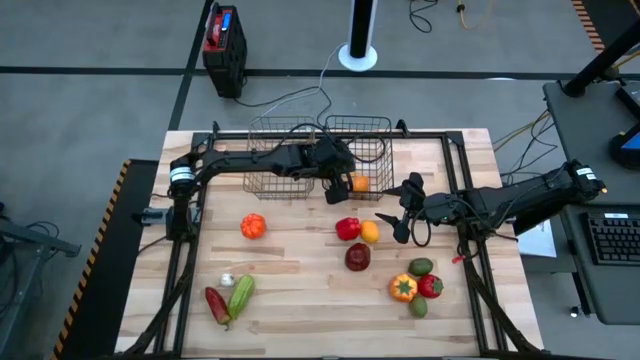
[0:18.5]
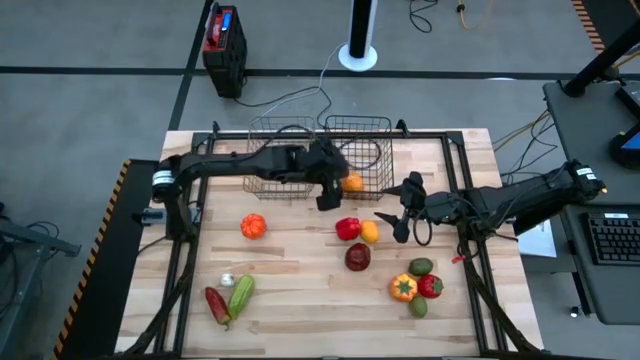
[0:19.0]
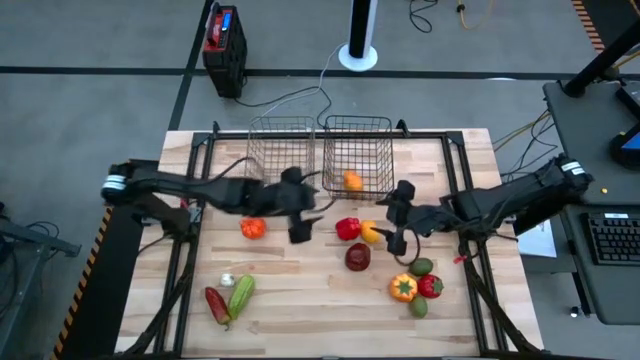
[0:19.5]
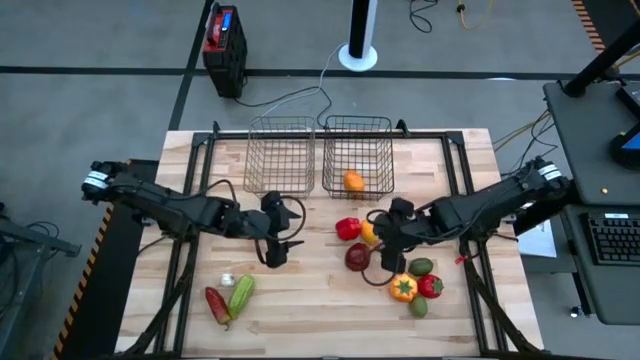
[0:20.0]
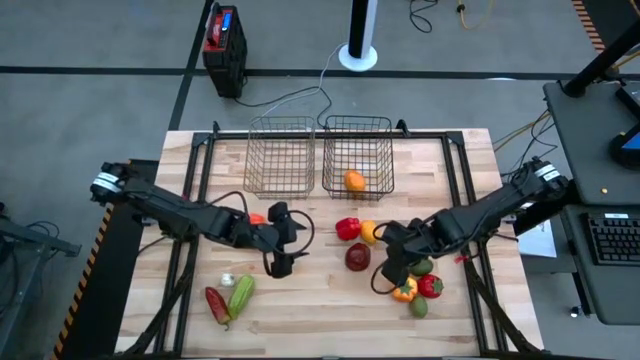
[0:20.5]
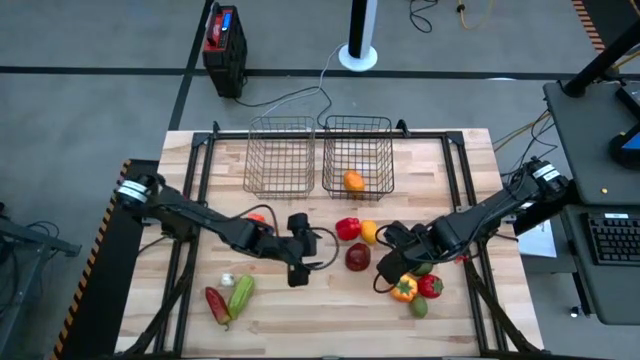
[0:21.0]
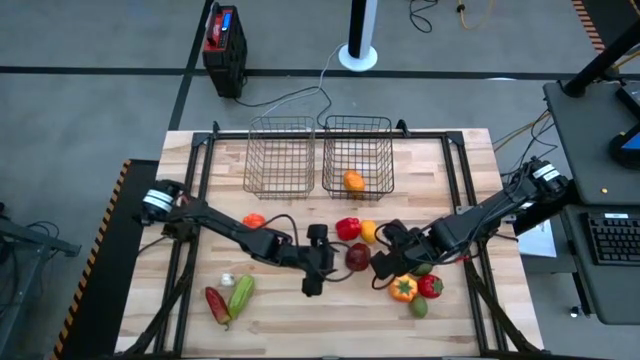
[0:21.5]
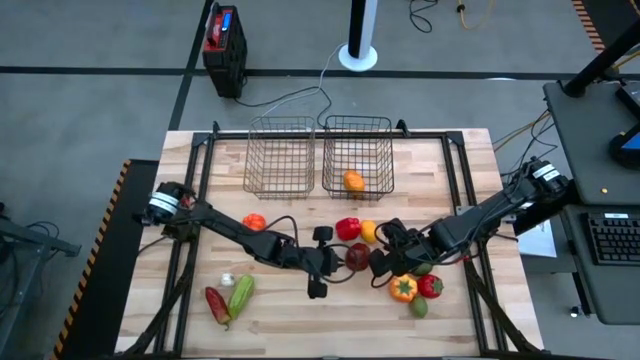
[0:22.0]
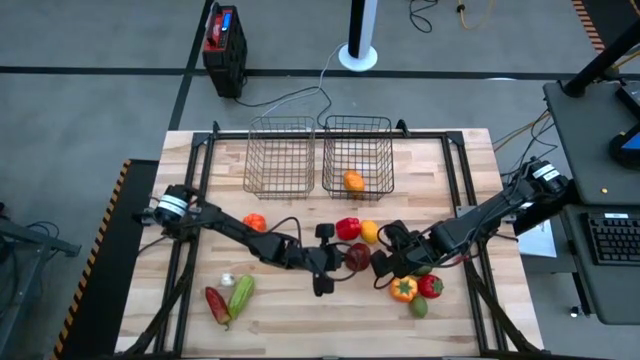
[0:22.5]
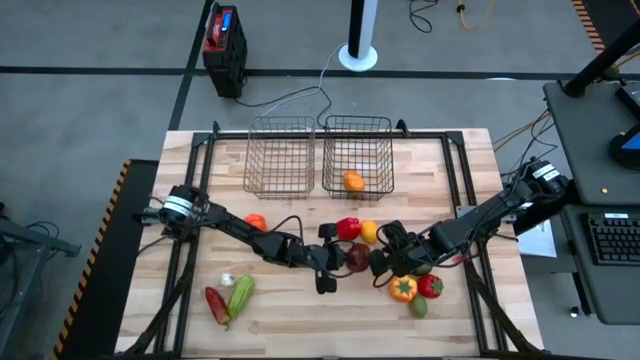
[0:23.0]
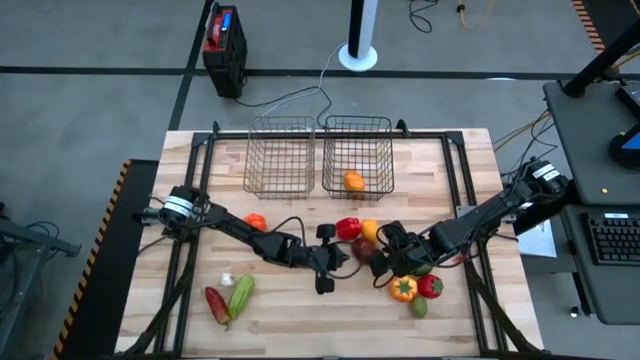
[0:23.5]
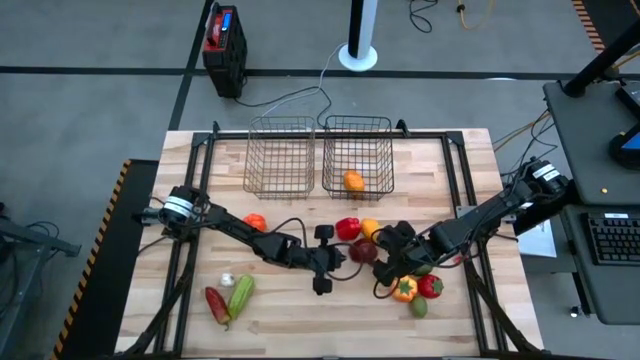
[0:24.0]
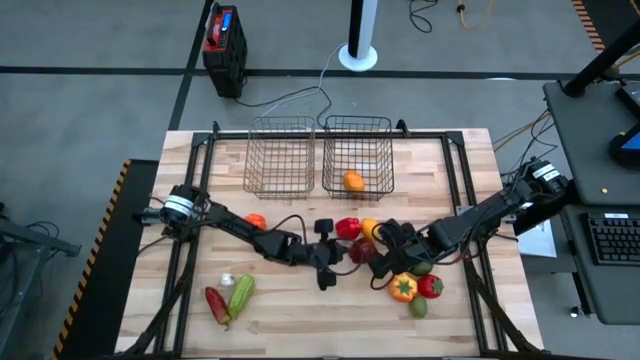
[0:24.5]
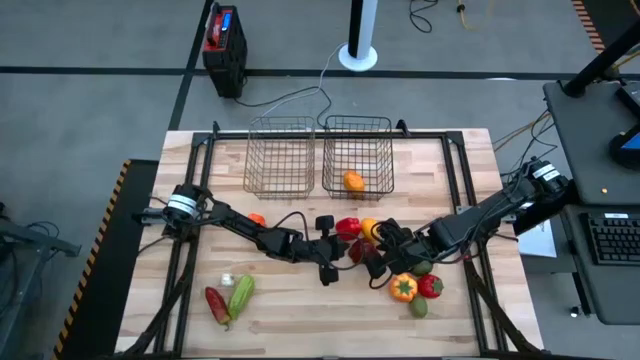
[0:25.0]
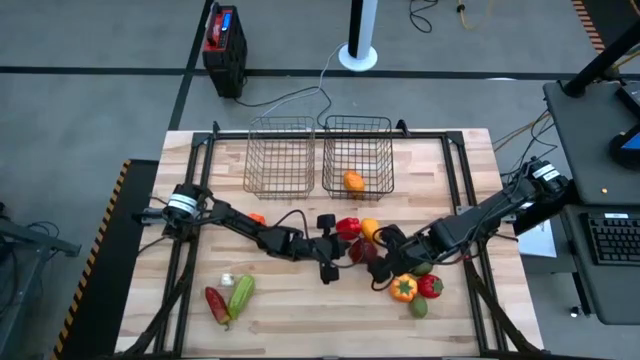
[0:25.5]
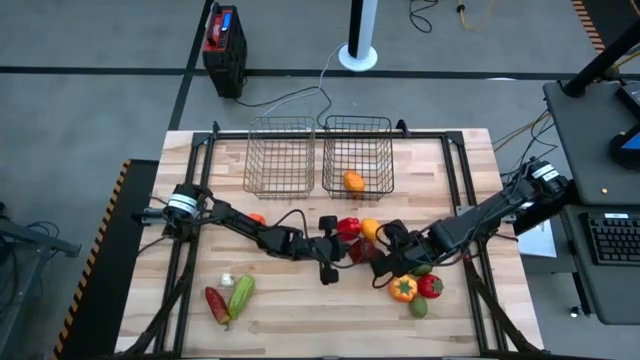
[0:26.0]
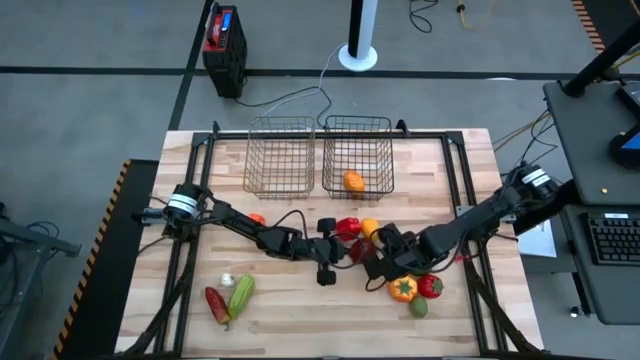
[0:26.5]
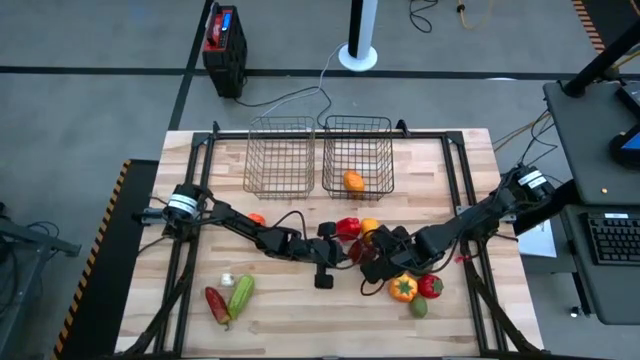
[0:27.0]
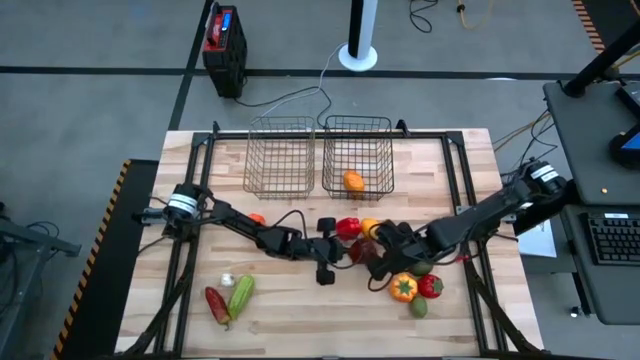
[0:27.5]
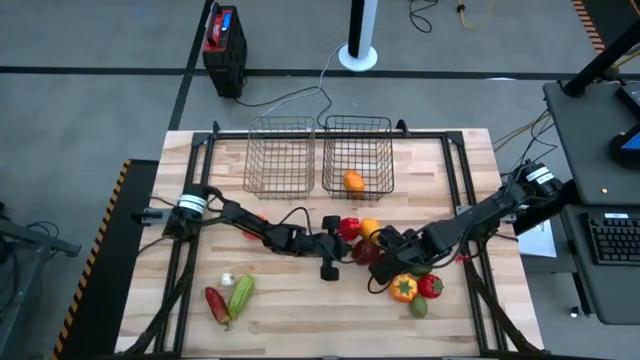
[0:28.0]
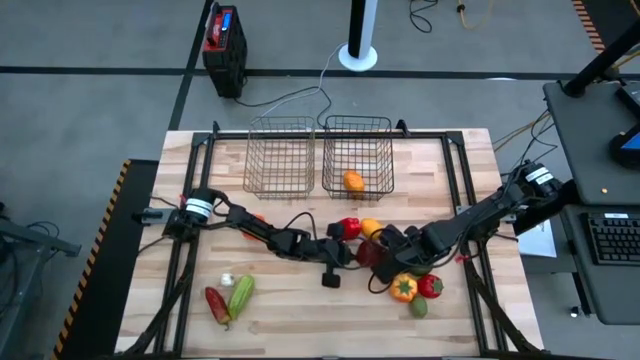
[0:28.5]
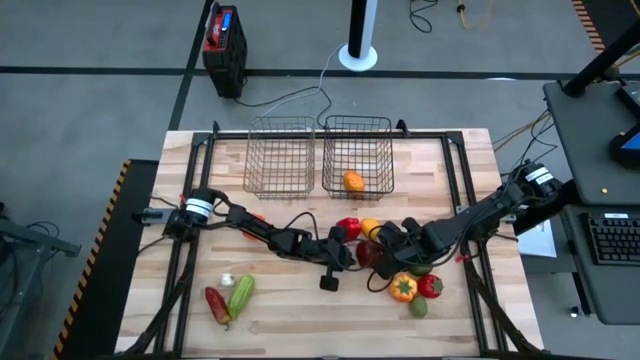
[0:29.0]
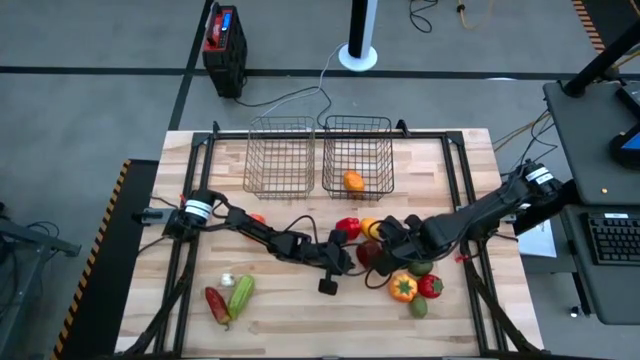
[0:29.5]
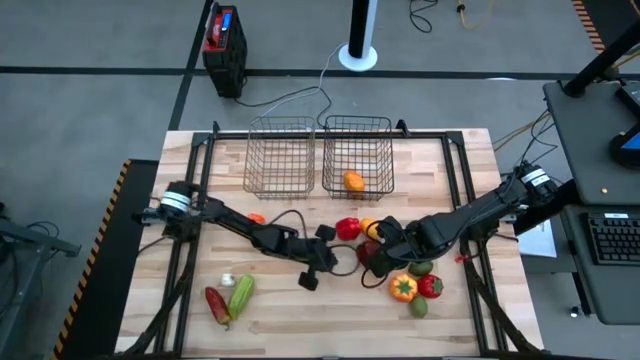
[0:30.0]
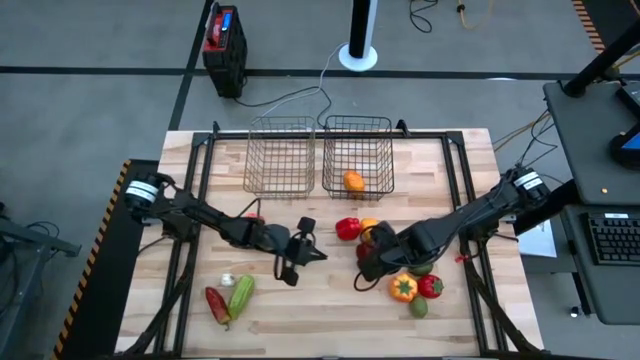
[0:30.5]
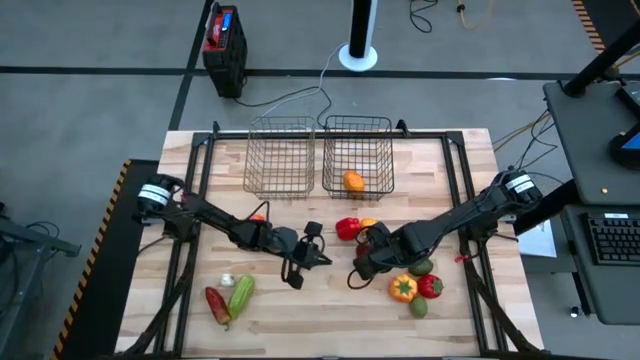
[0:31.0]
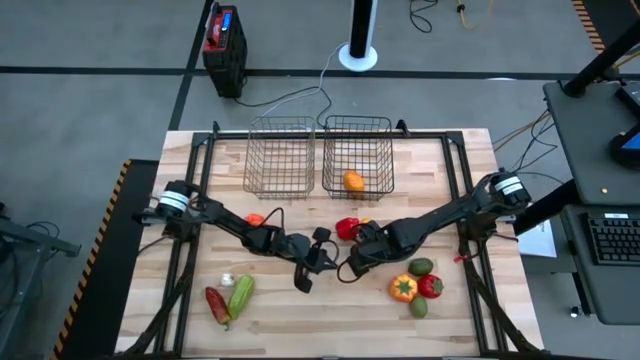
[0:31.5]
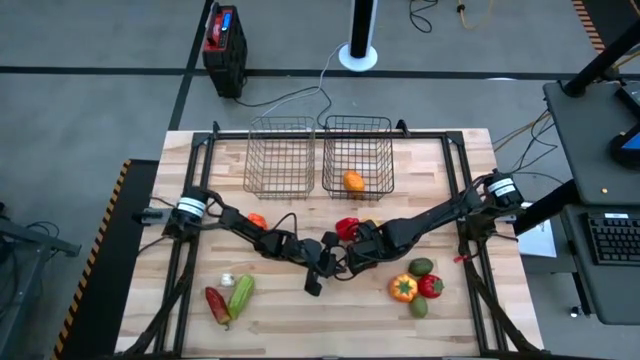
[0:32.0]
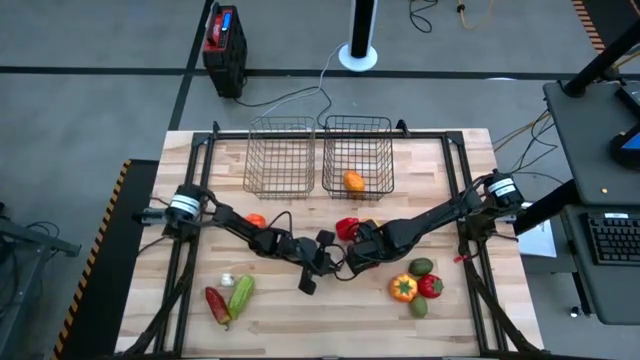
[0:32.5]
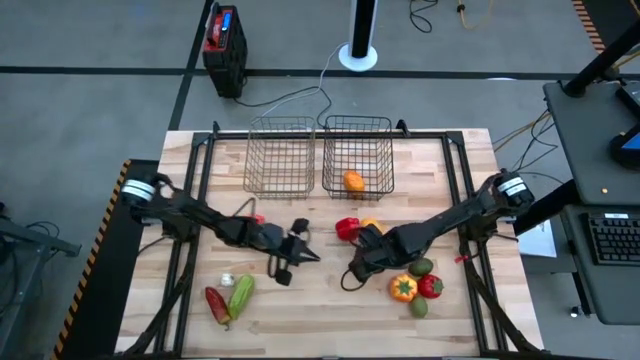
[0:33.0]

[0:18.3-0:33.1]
Task: Sort produce into baskets
Put the red apple into the silver wire basket

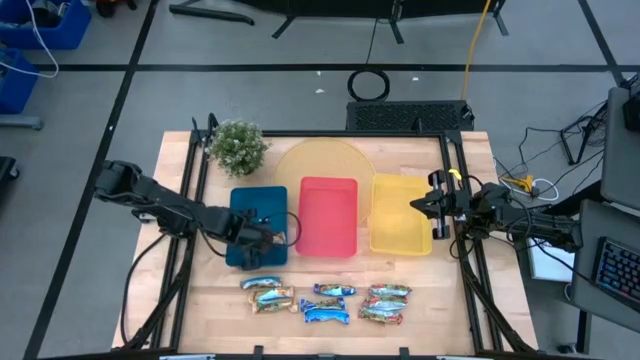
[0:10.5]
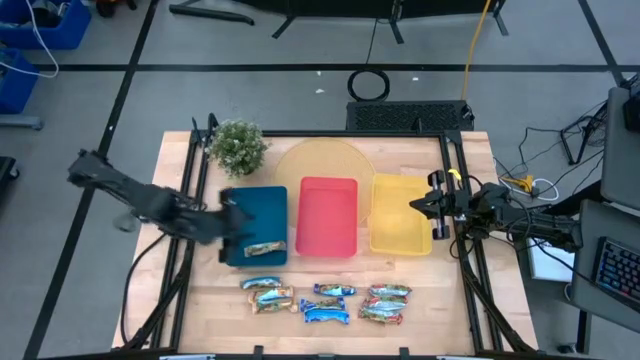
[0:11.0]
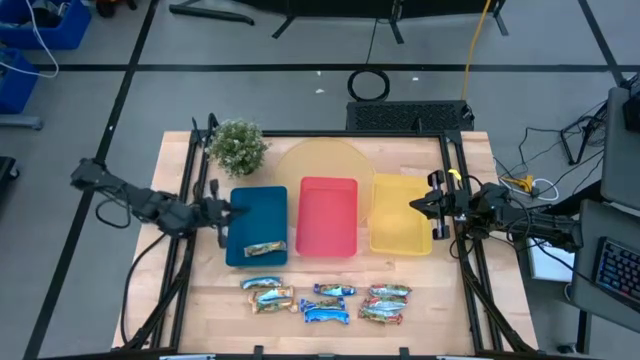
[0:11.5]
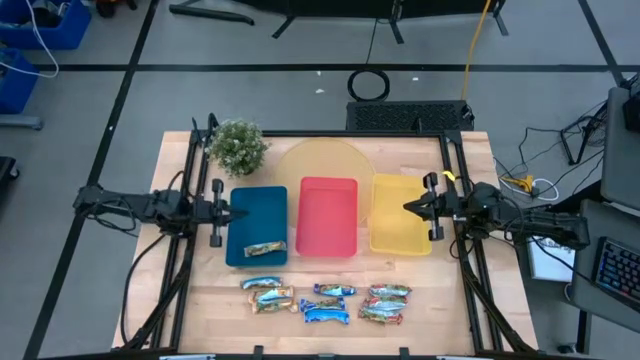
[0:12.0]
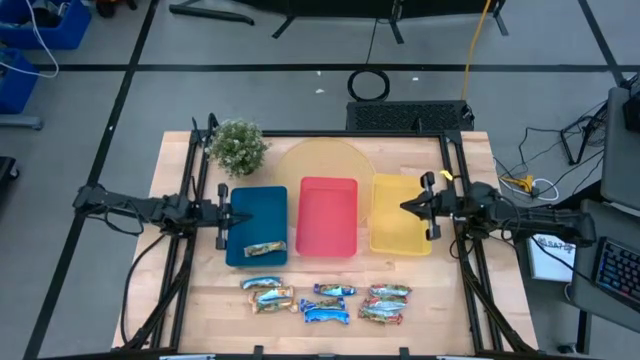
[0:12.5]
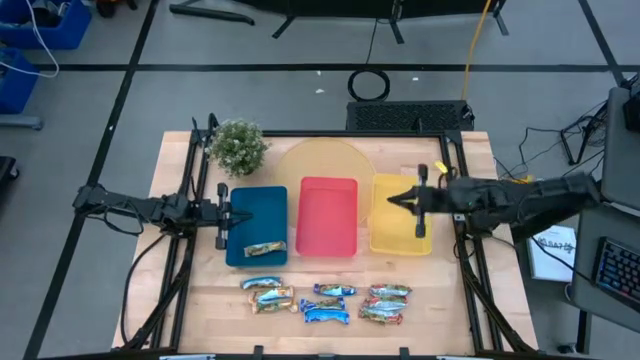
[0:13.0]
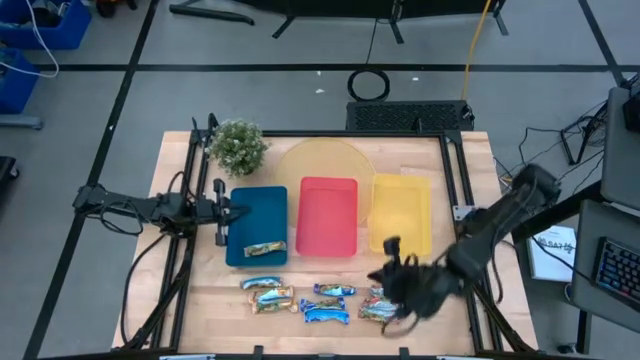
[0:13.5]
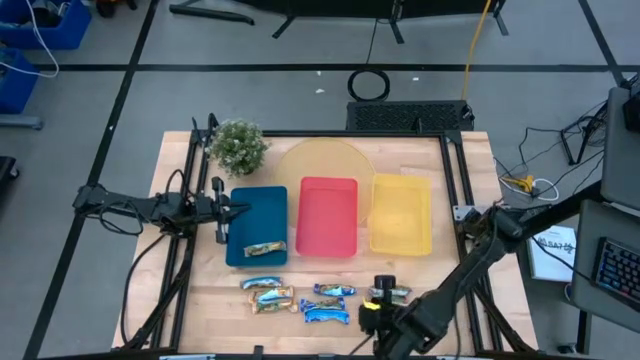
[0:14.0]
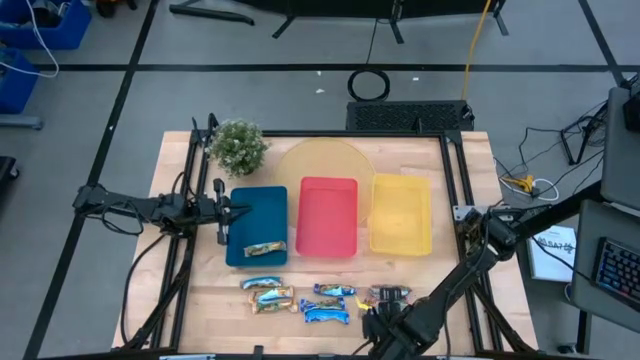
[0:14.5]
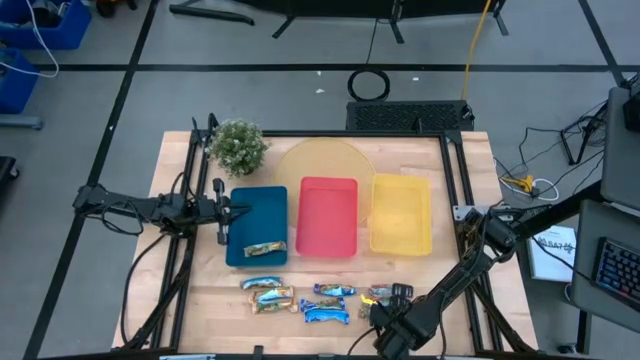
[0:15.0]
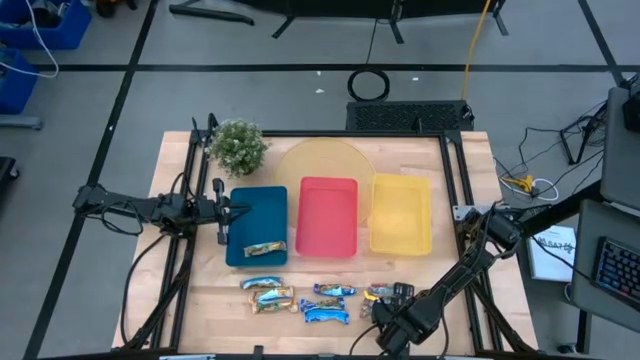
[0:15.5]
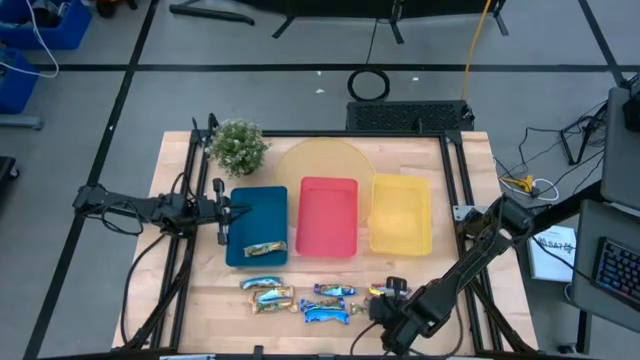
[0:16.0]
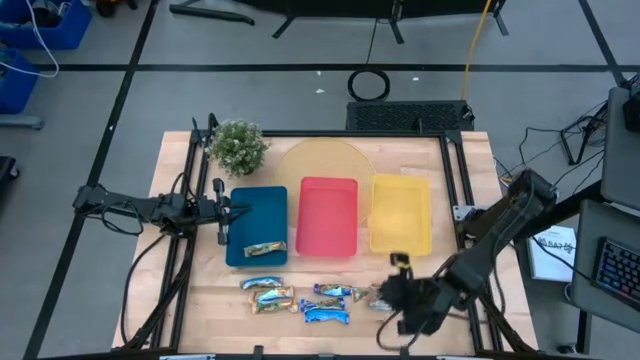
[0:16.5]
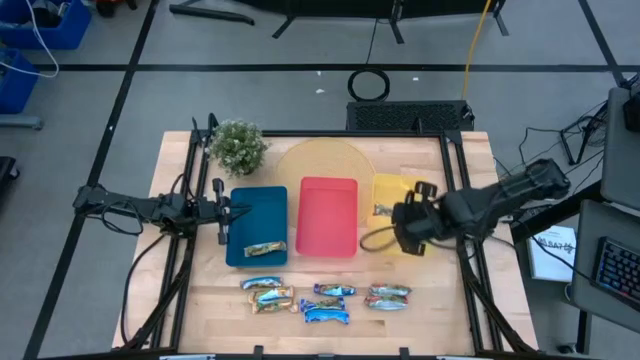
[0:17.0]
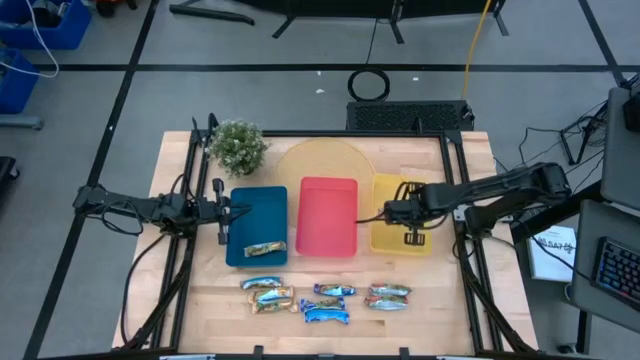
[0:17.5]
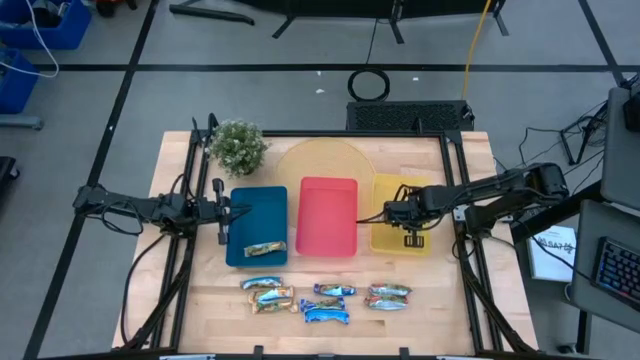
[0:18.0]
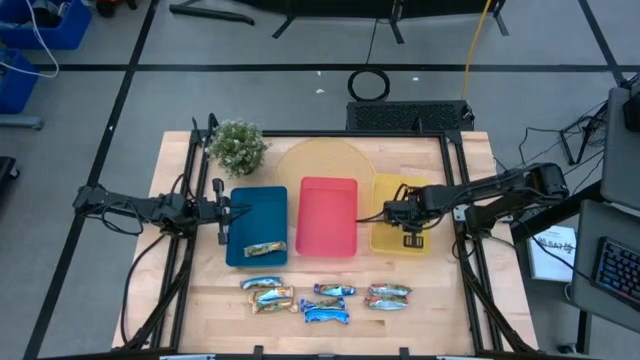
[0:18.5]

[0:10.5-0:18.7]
Task: Pick and place Granola Bars by type
Put the red granola bar into the yellow bin
